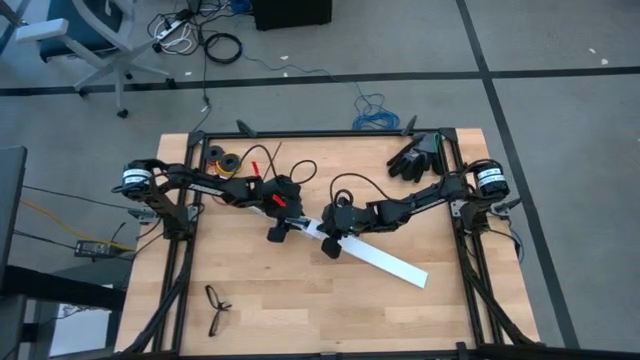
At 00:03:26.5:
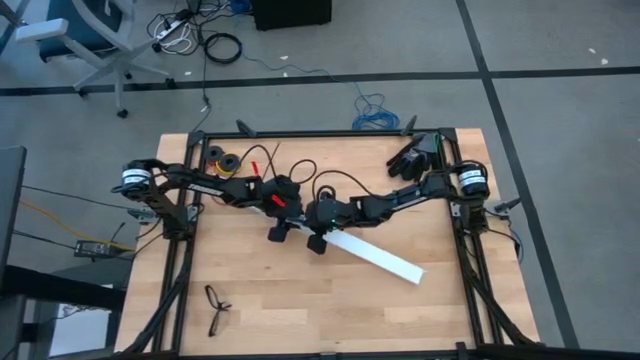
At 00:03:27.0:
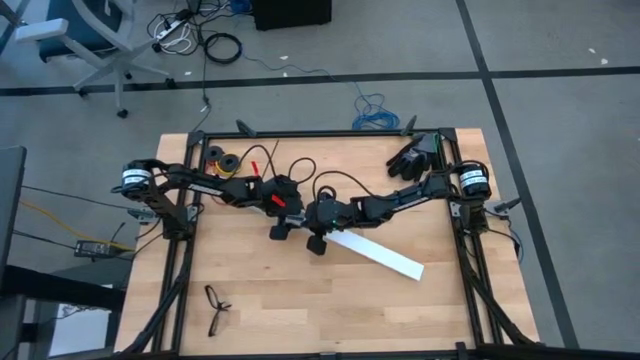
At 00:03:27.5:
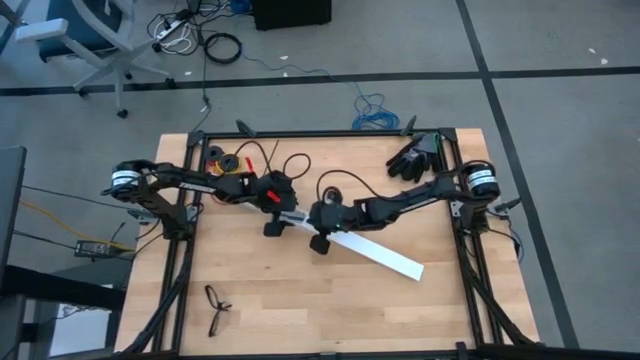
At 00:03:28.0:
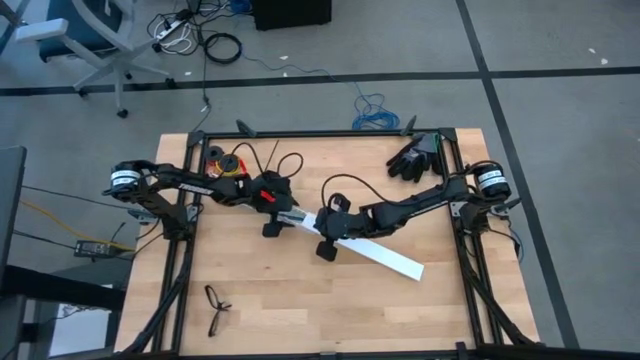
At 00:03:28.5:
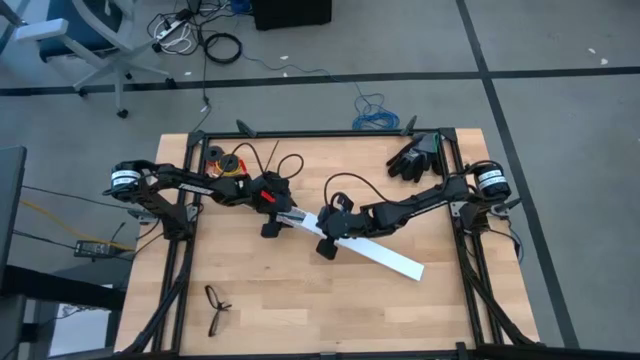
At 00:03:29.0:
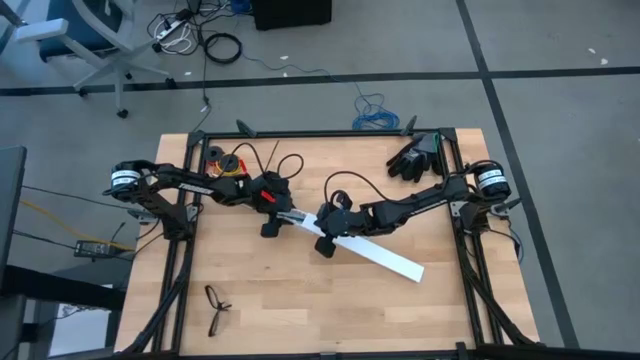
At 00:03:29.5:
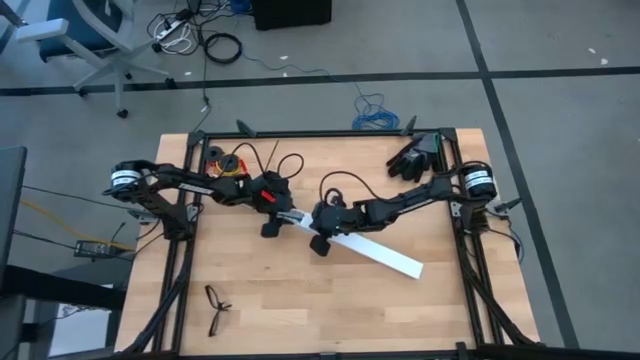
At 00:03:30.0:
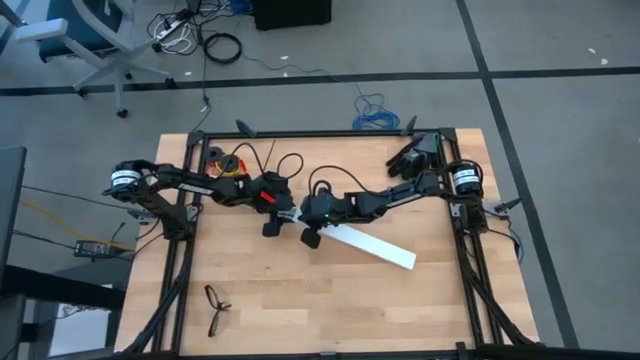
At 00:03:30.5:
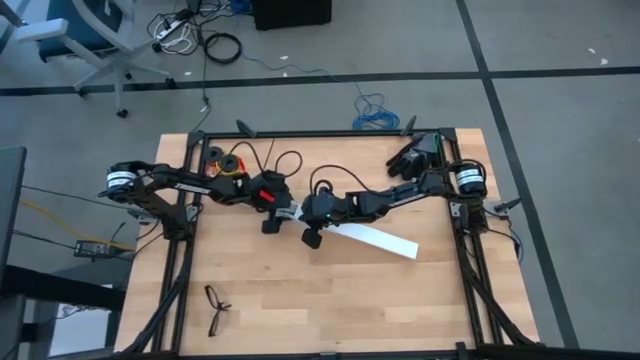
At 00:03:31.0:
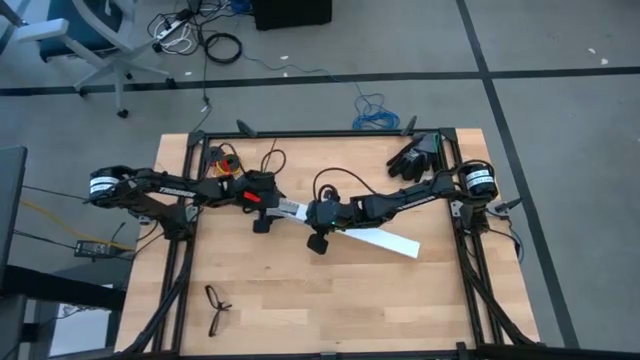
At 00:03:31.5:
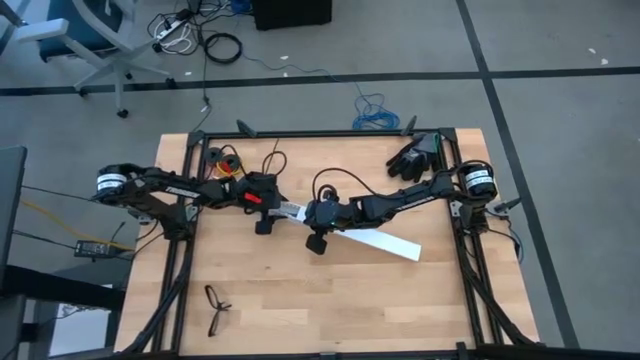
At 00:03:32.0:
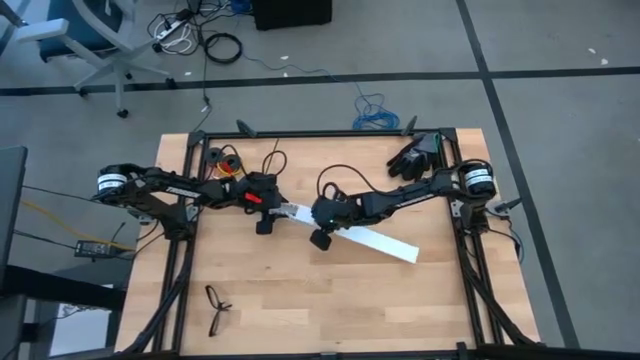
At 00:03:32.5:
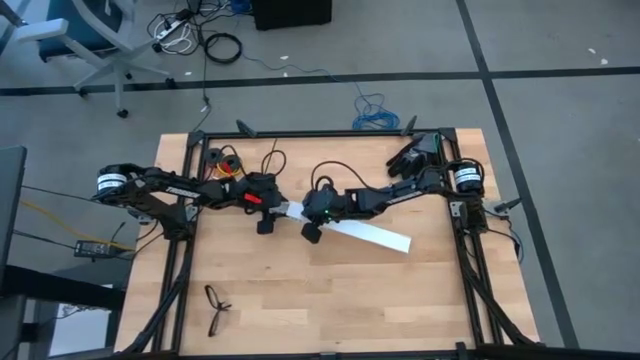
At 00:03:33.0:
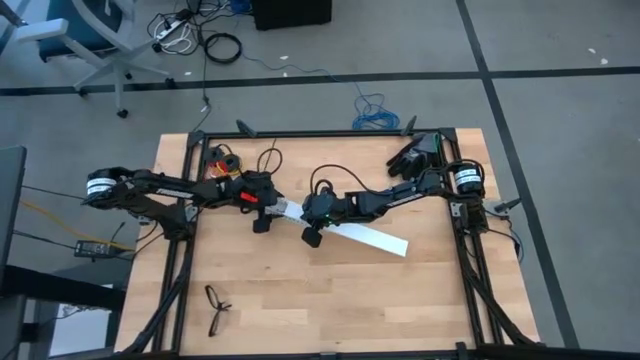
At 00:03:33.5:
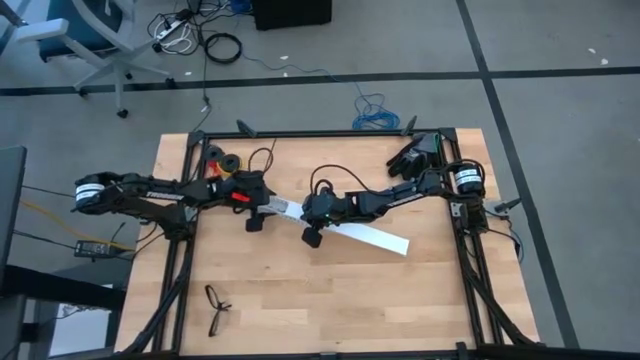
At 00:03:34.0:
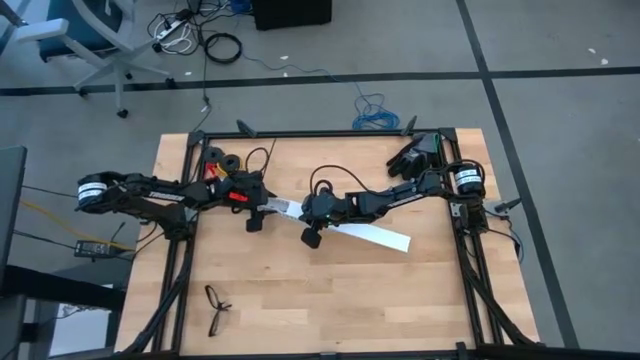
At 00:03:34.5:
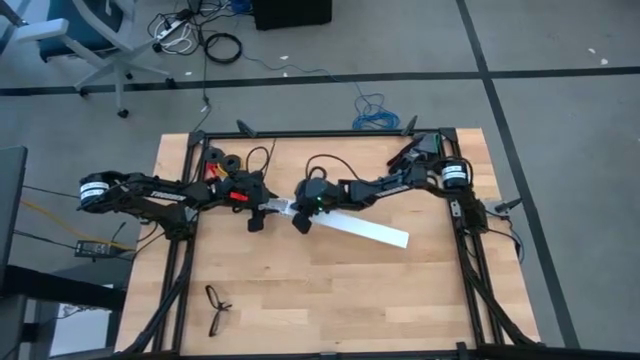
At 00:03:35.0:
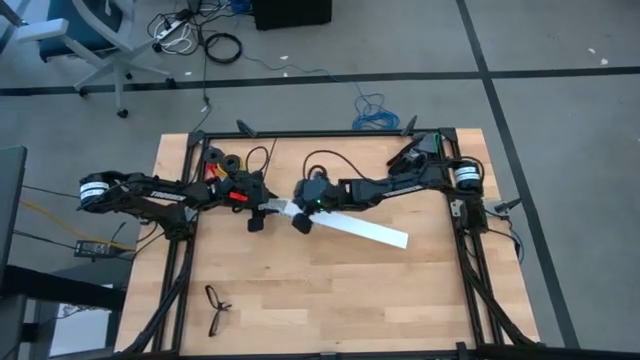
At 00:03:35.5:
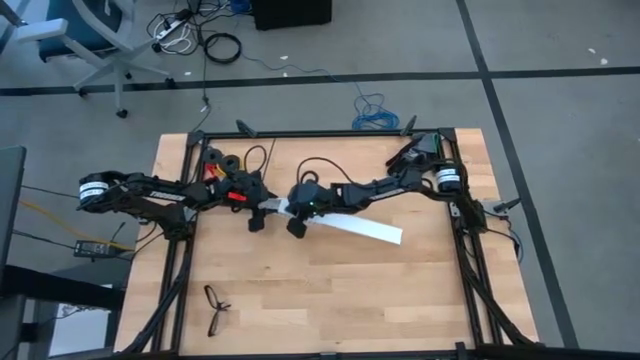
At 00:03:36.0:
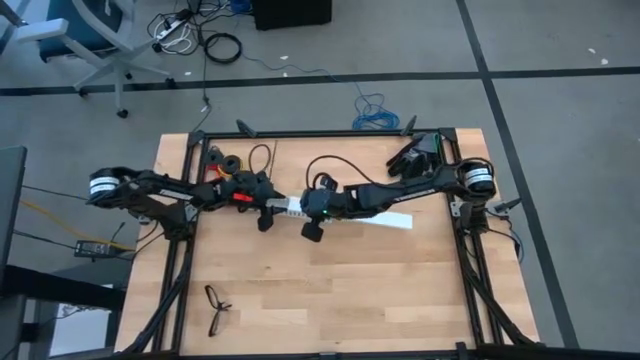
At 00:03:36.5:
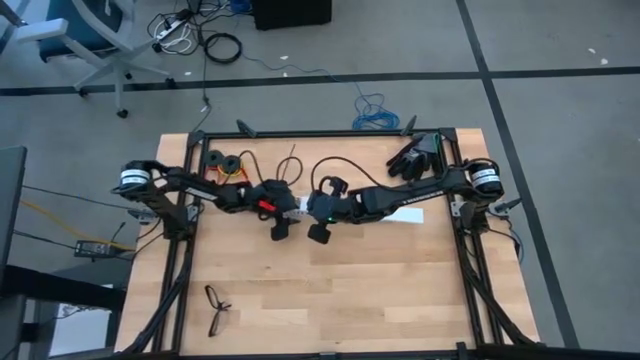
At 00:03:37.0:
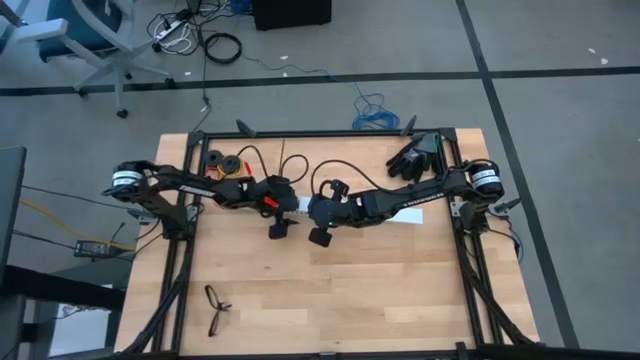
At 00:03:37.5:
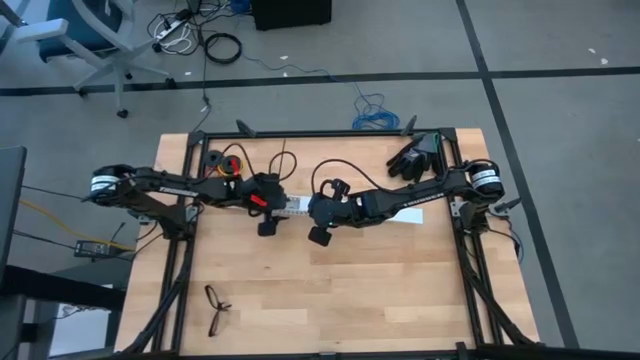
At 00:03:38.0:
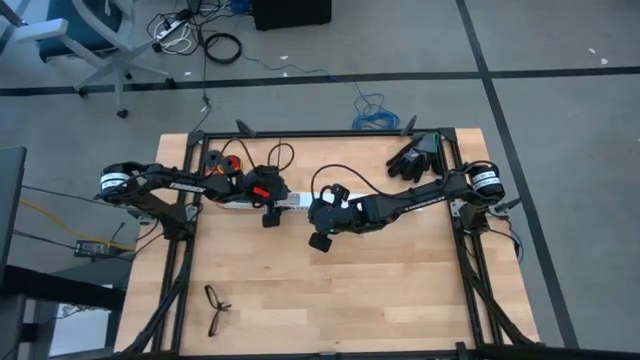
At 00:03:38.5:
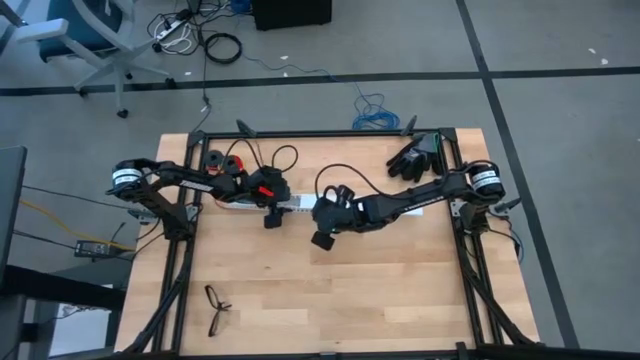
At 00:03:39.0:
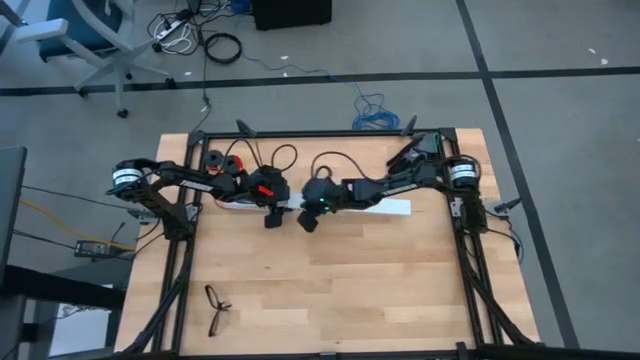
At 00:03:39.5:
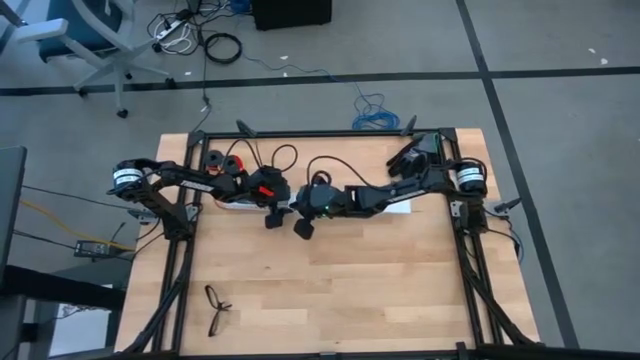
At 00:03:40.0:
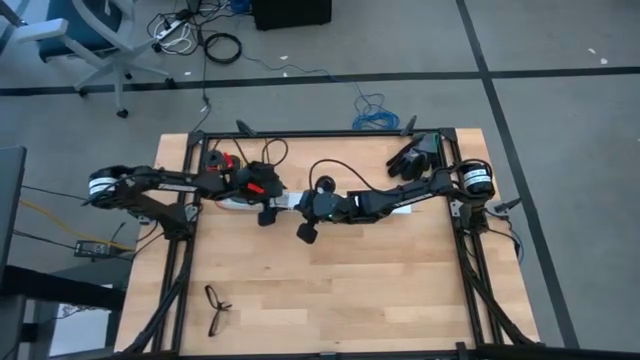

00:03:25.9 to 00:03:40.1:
Task: Ziptie cables
Close the white cable duct

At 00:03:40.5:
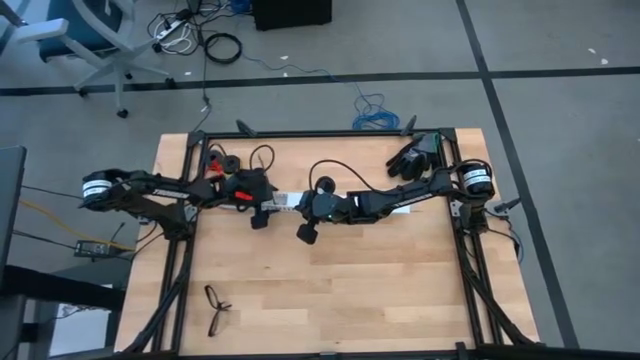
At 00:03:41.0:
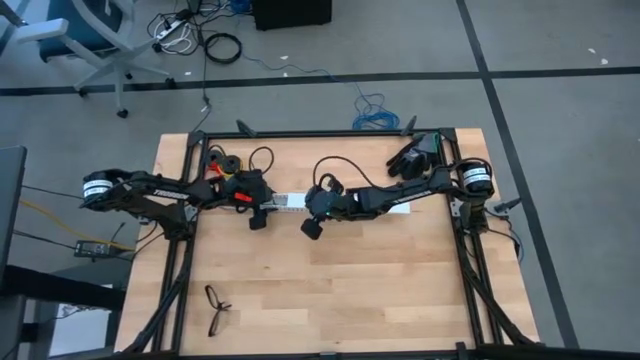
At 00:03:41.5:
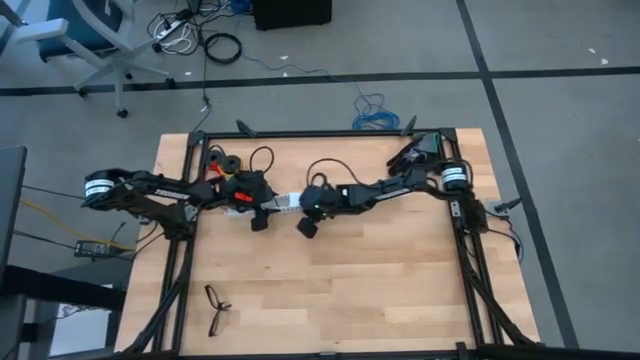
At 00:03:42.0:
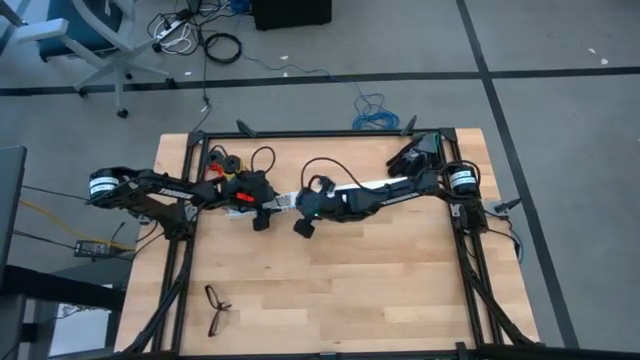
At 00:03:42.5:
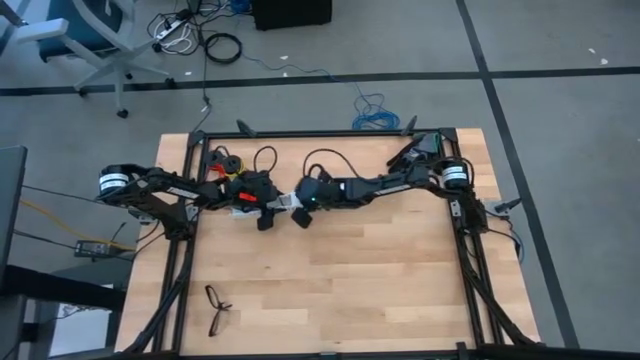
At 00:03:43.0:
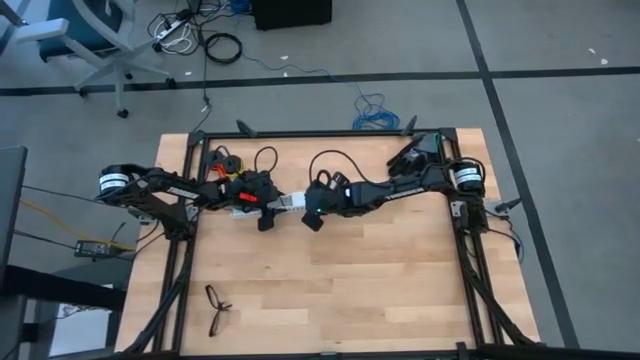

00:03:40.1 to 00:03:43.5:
Close the white cable duct

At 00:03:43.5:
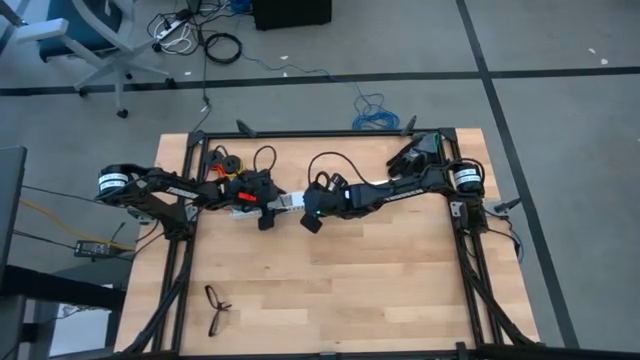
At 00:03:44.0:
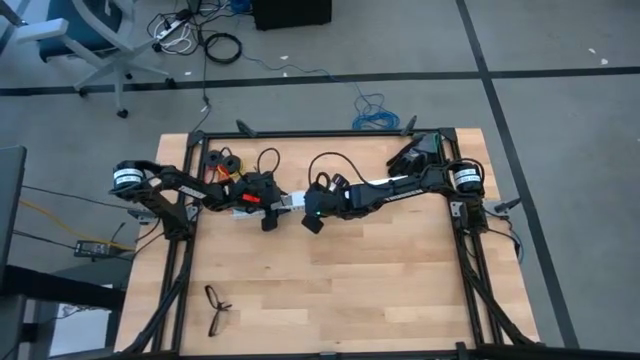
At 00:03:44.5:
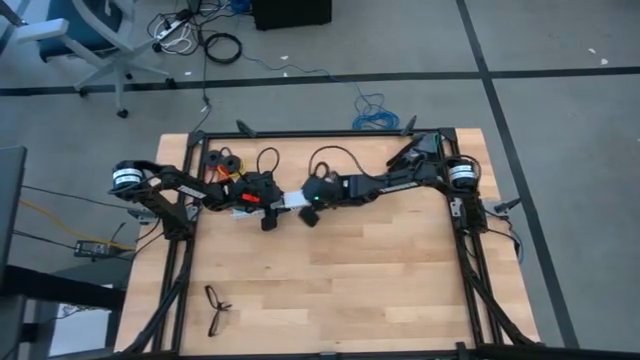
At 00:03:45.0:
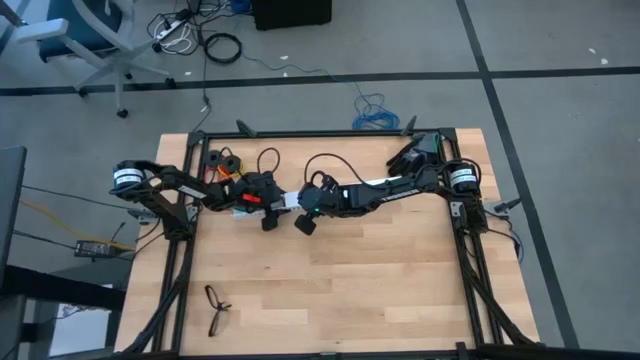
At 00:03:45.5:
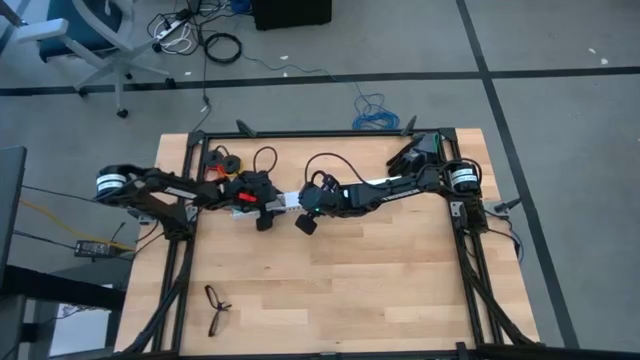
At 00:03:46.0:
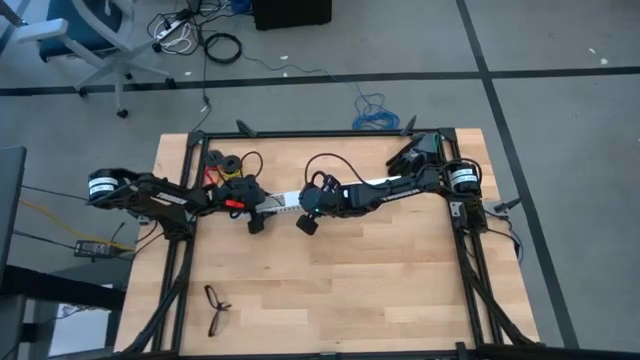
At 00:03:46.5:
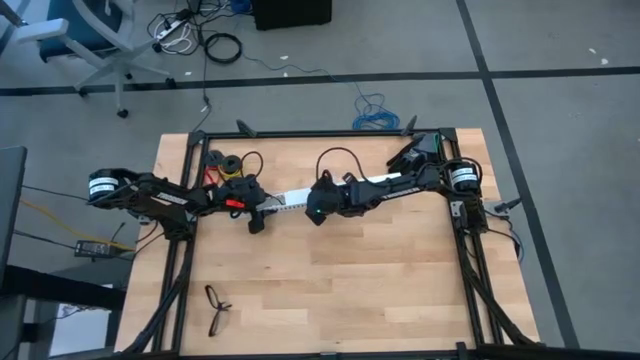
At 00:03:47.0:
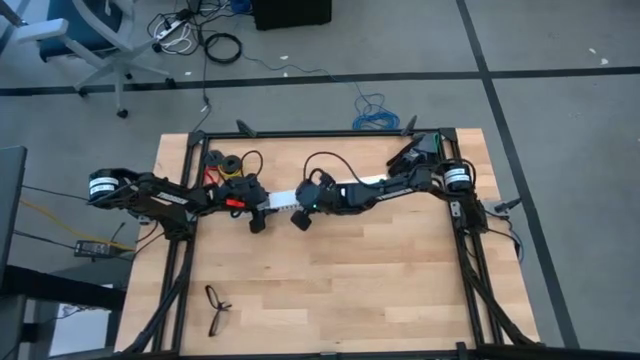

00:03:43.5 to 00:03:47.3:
Close the white cable duct
